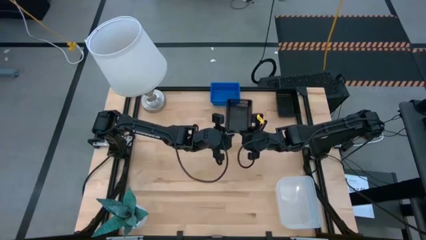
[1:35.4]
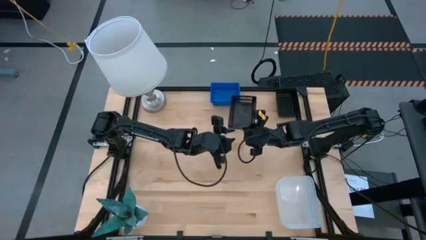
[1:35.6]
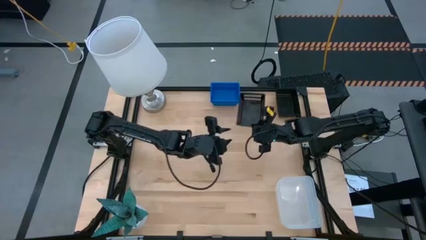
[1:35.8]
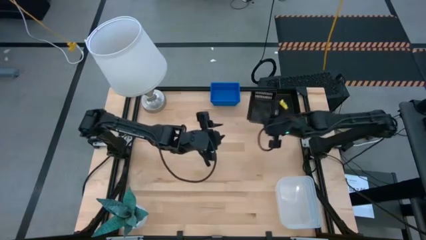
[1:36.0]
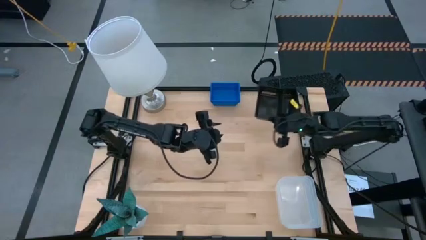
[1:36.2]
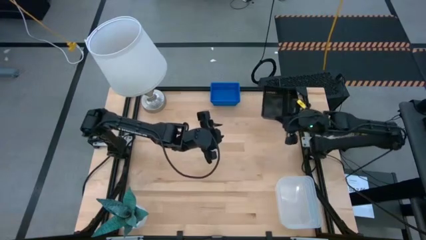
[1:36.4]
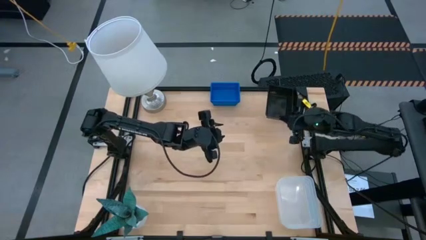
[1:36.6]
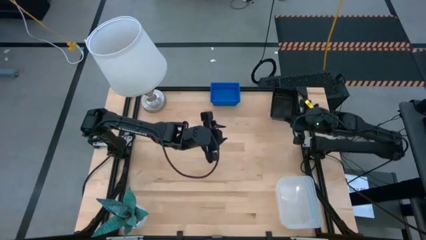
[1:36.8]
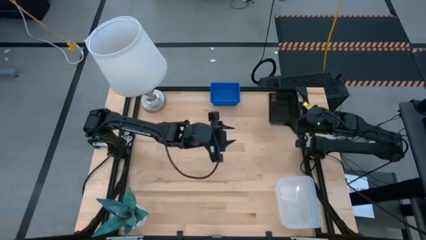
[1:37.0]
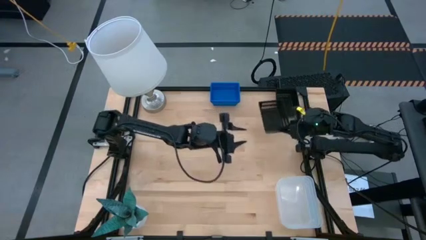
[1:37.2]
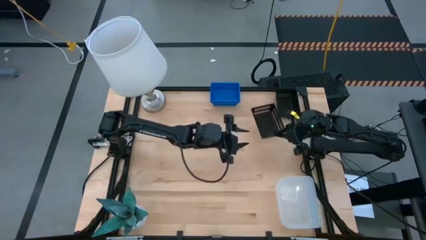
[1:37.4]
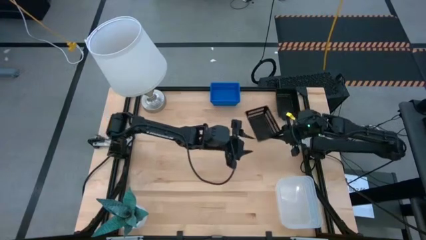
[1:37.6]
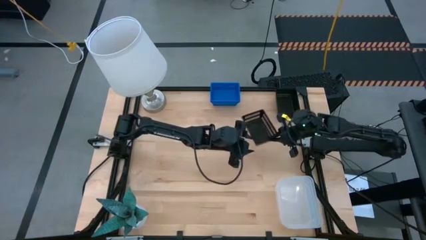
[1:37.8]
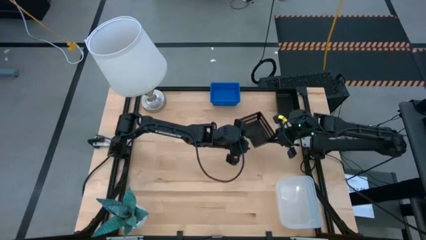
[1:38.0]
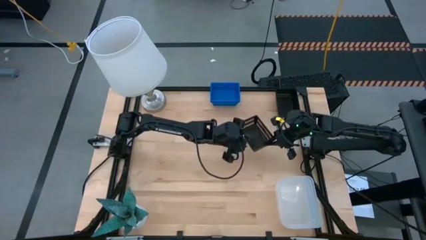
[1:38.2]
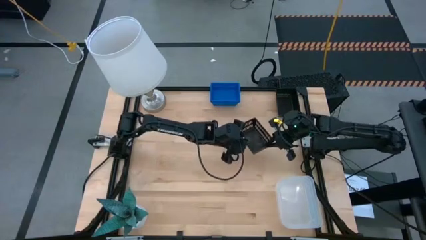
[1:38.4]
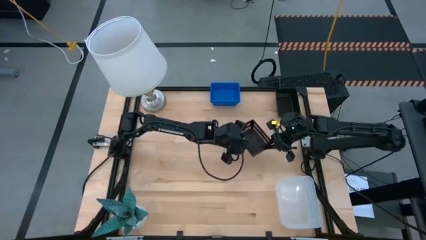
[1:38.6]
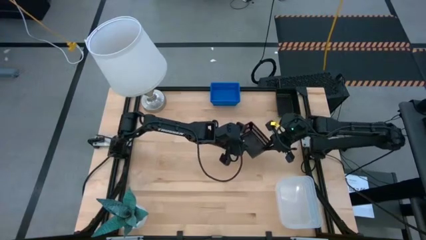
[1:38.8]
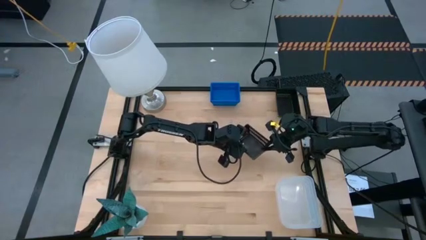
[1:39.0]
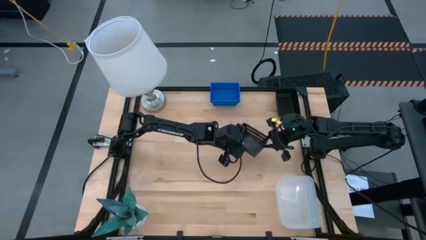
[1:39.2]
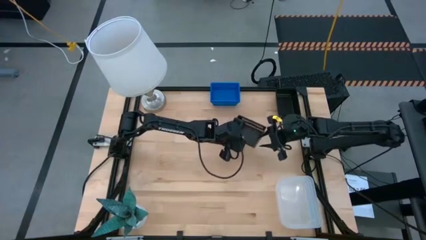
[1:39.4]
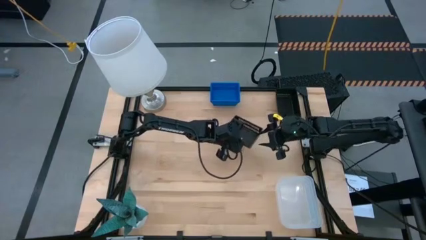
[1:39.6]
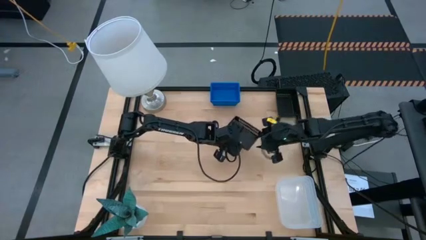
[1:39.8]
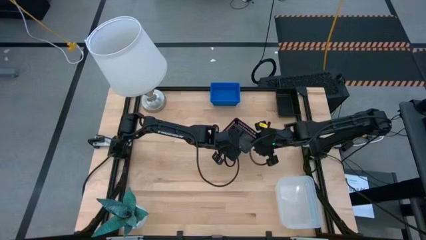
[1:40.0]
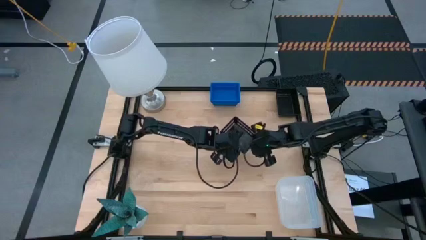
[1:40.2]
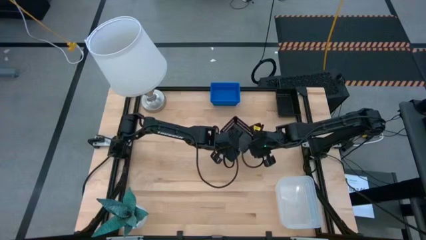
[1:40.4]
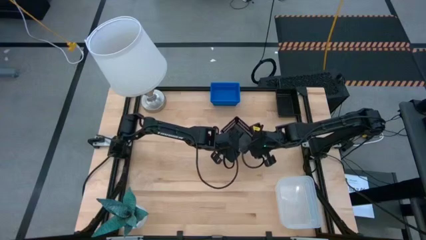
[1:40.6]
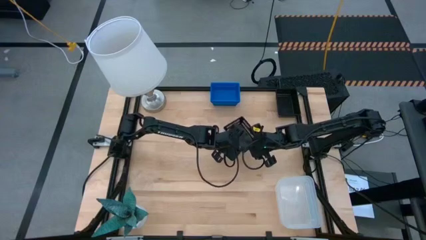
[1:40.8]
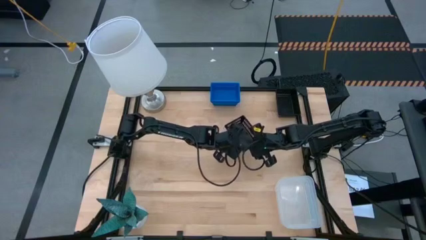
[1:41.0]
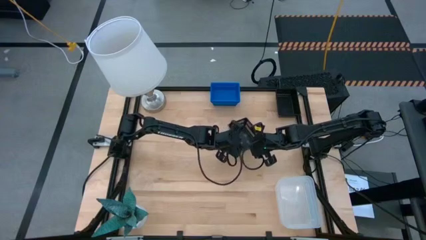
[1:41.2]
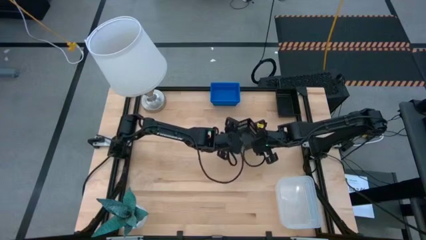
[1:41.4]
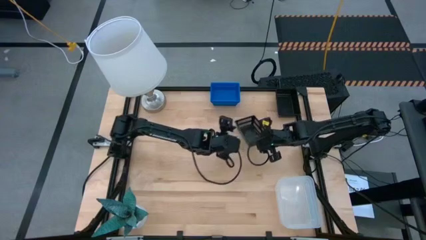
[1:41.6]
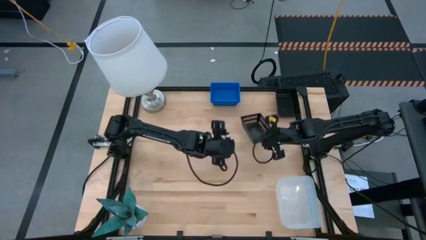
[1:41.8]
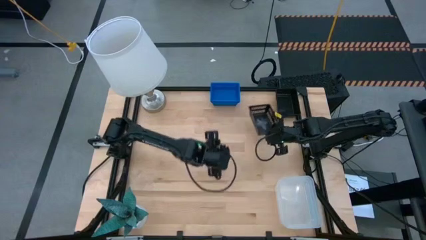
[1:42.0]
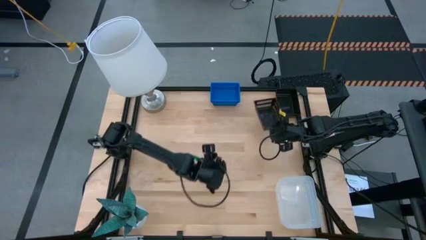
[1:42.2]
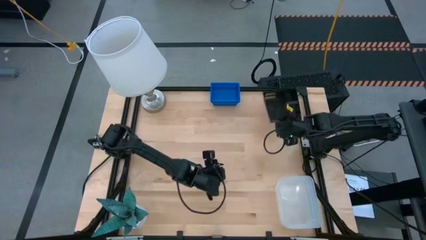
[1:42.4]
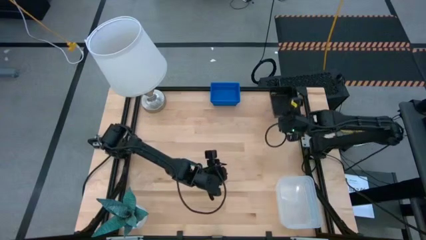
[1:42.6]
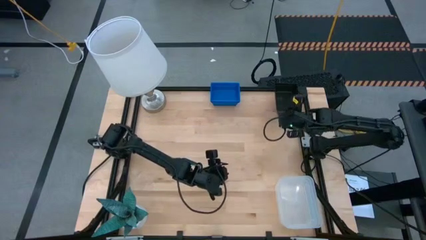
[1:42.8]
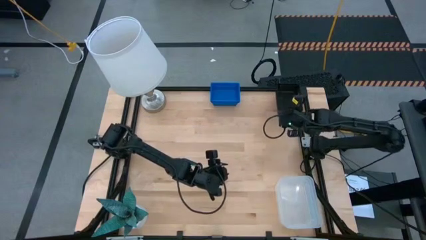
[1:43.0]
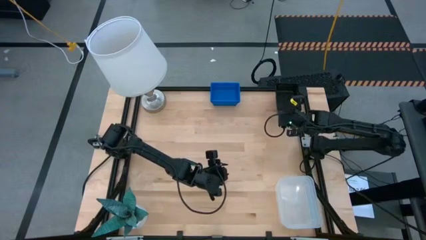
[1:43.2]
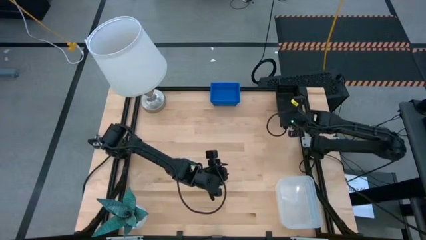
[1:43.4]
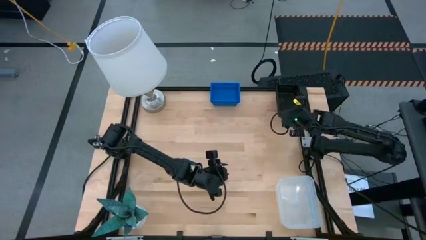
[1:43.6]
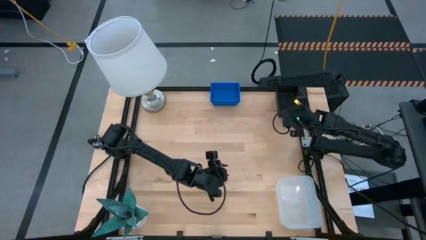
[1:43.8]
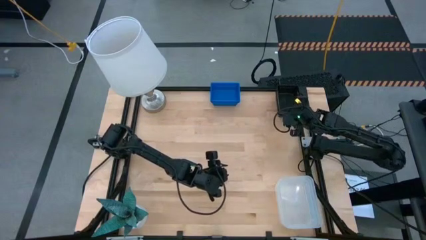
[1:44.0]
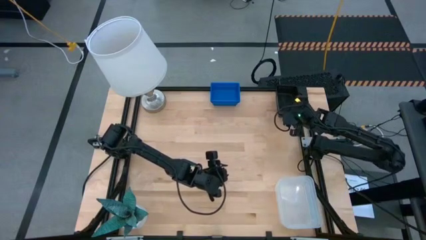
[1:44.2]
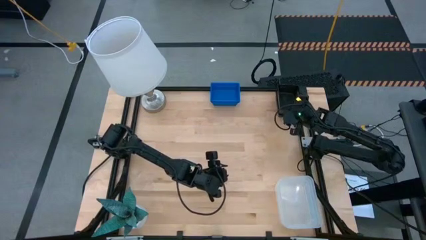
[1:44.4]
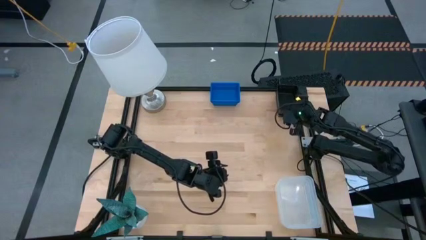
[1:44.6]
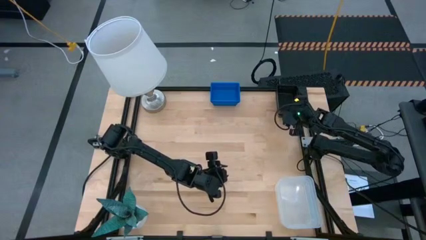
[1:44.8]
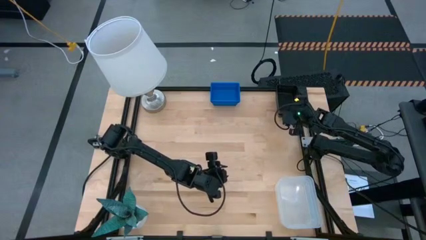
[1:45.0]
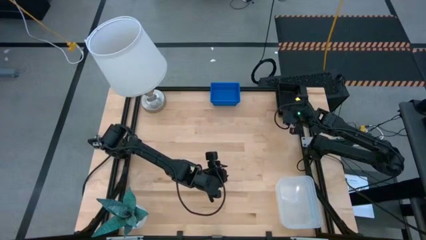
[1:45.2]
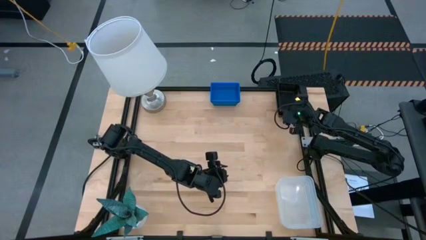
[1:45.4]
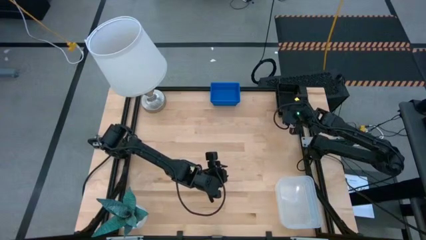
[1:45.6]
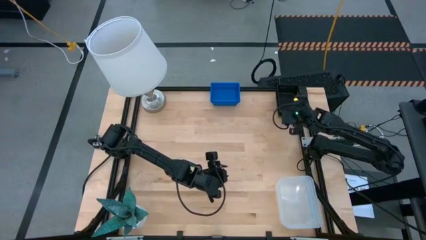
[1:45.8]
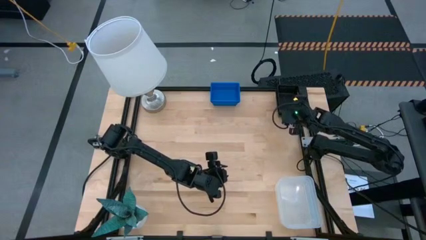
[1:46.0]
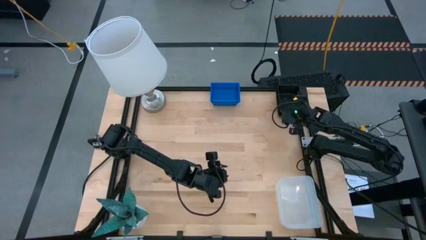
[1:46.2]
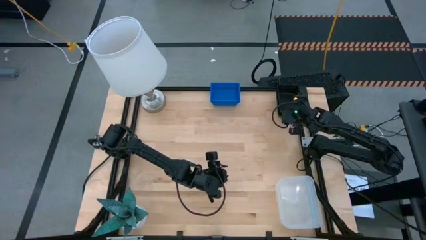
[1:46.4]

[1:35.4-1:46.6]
Stack the bottom black bin on top of the top black bin
